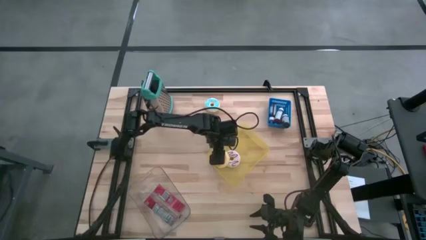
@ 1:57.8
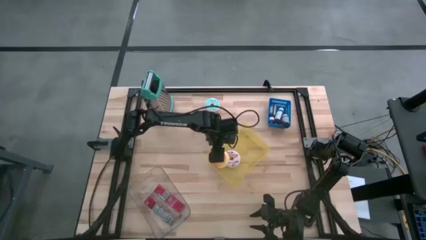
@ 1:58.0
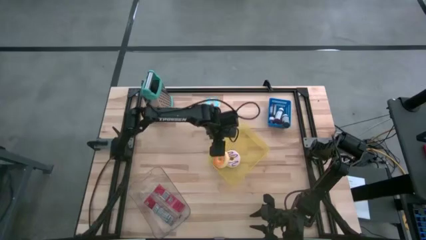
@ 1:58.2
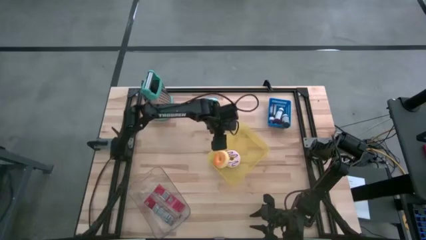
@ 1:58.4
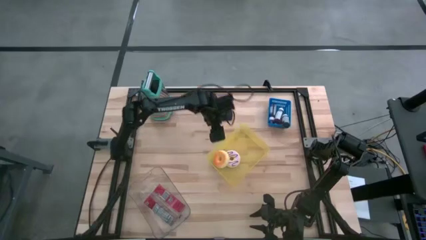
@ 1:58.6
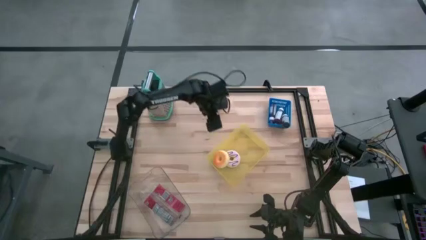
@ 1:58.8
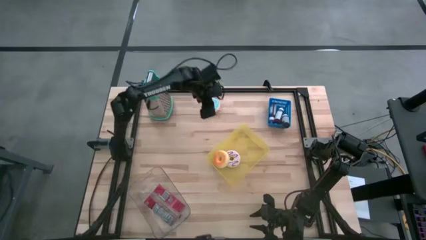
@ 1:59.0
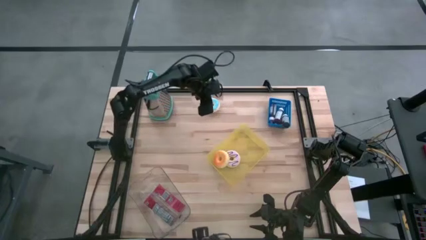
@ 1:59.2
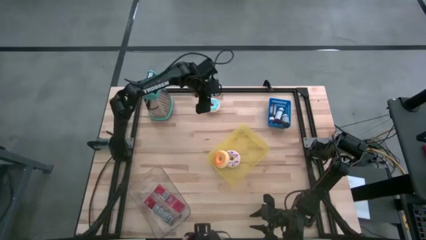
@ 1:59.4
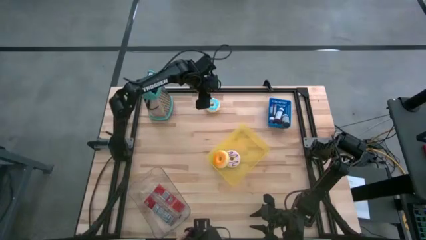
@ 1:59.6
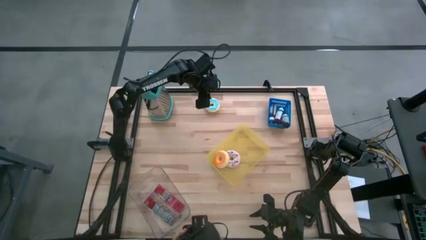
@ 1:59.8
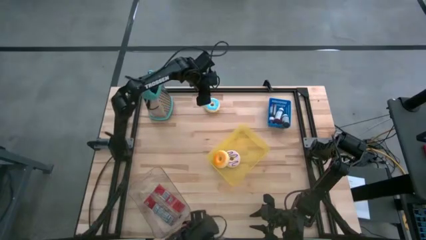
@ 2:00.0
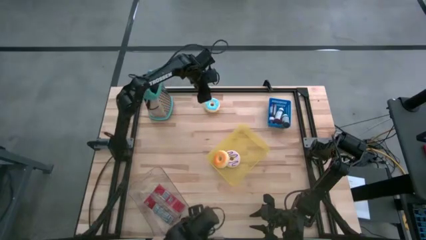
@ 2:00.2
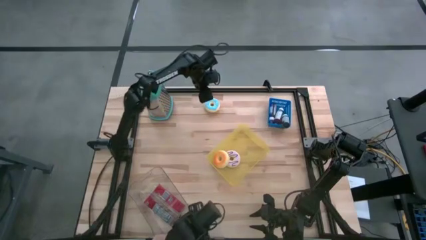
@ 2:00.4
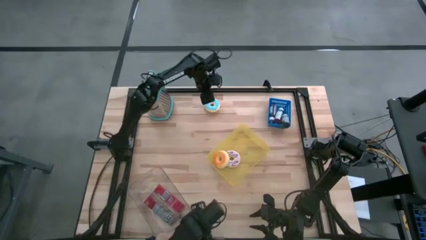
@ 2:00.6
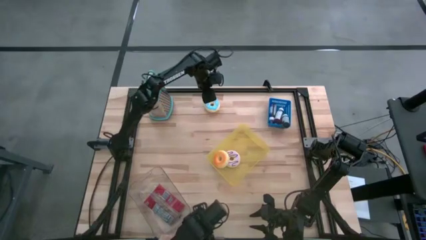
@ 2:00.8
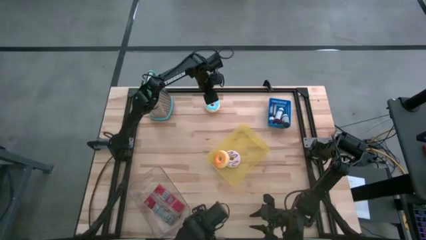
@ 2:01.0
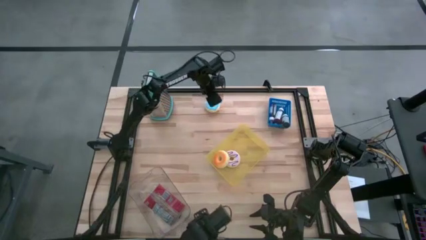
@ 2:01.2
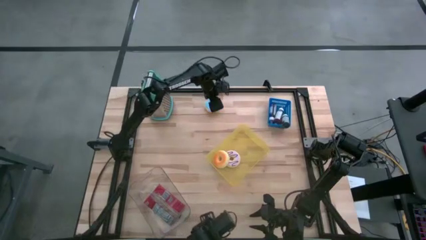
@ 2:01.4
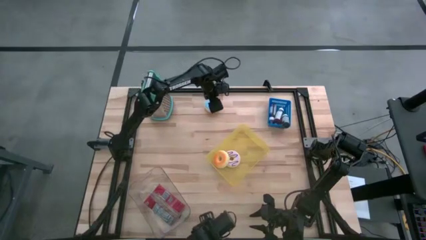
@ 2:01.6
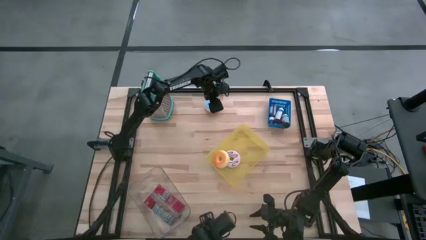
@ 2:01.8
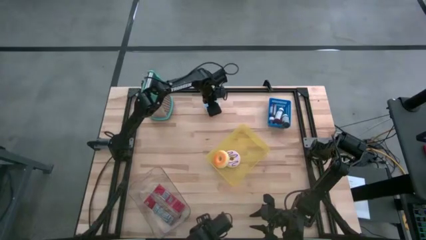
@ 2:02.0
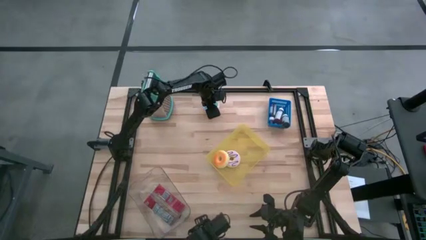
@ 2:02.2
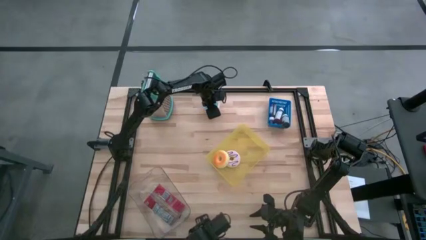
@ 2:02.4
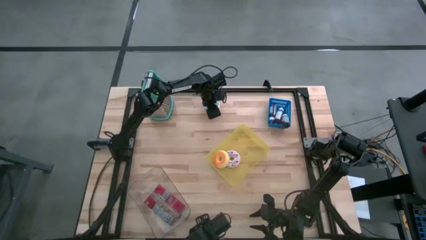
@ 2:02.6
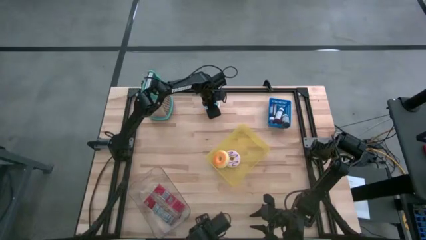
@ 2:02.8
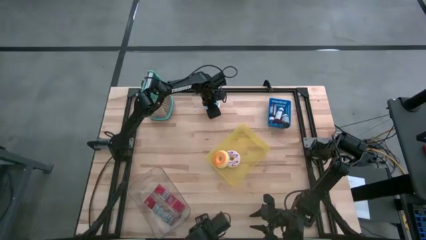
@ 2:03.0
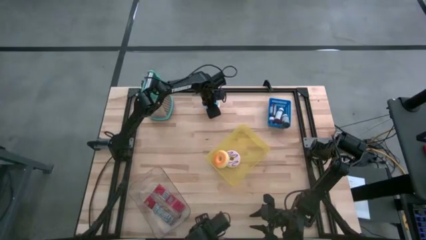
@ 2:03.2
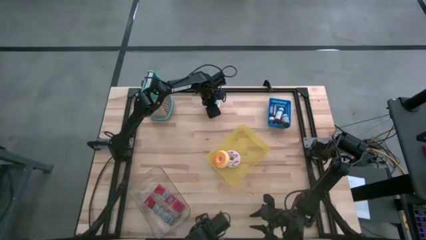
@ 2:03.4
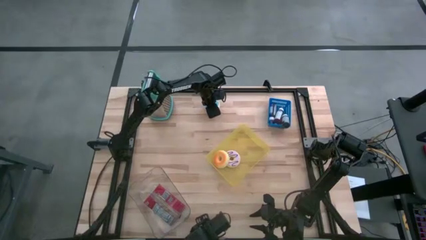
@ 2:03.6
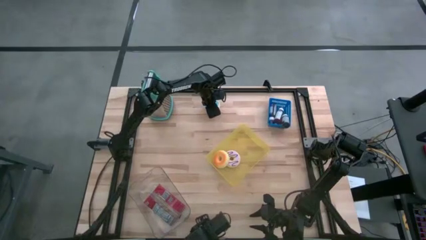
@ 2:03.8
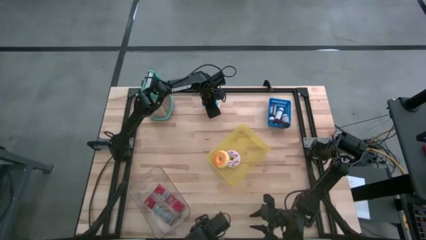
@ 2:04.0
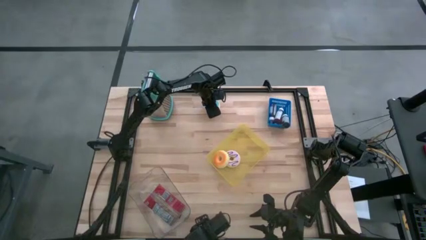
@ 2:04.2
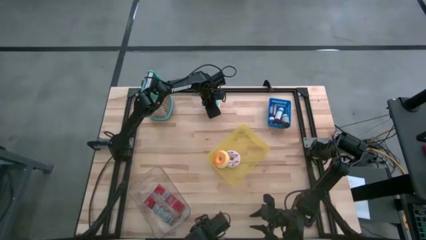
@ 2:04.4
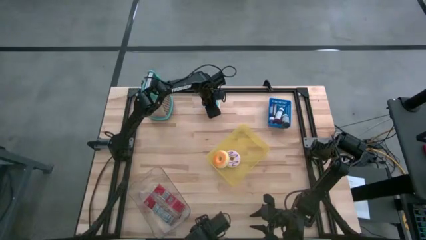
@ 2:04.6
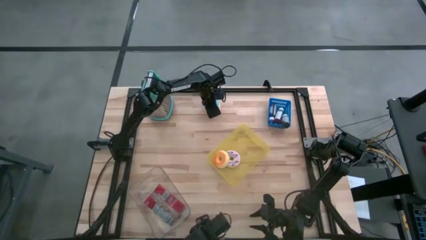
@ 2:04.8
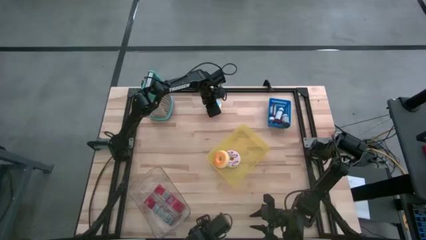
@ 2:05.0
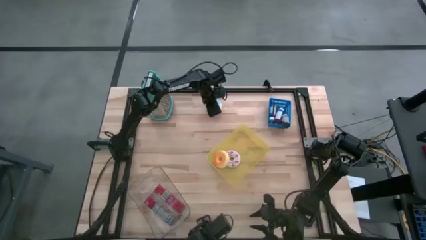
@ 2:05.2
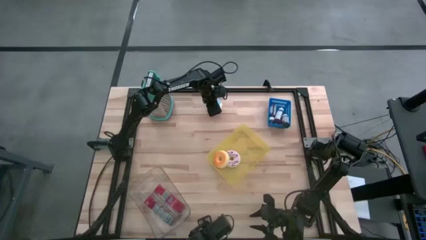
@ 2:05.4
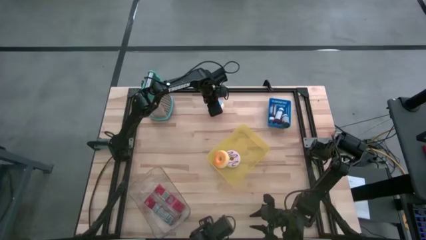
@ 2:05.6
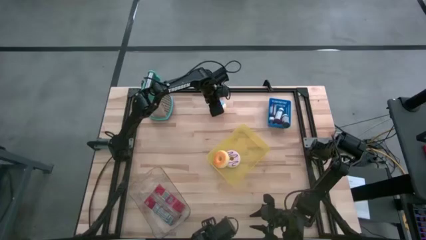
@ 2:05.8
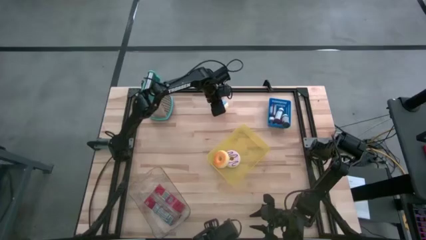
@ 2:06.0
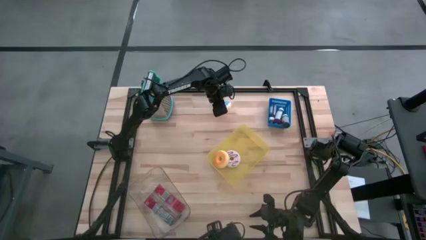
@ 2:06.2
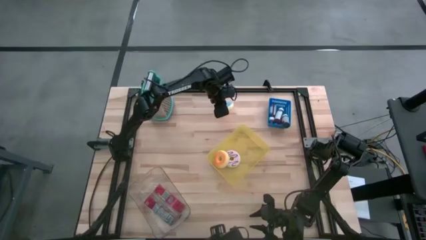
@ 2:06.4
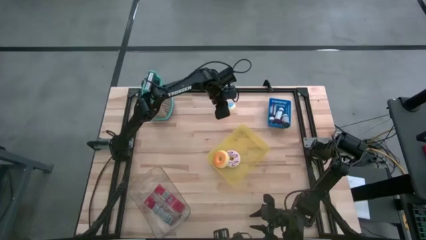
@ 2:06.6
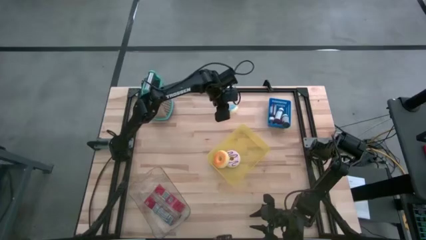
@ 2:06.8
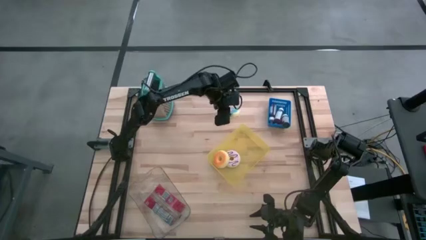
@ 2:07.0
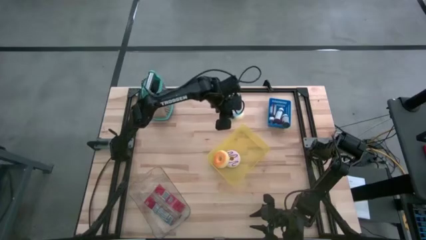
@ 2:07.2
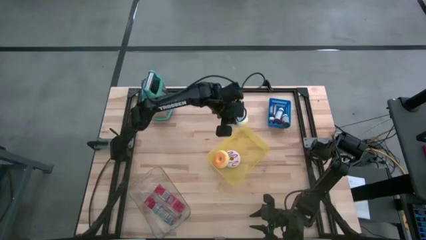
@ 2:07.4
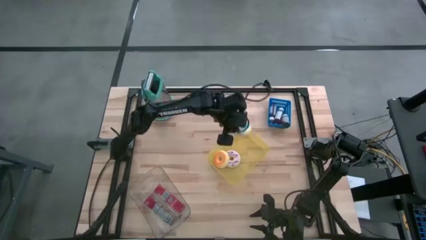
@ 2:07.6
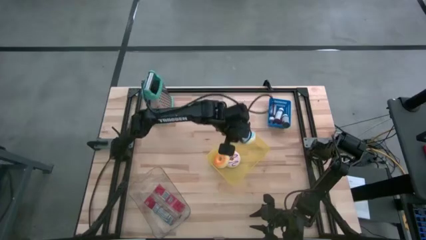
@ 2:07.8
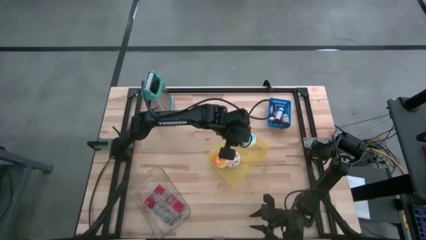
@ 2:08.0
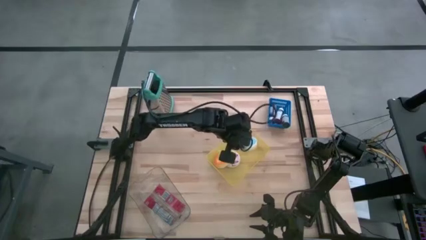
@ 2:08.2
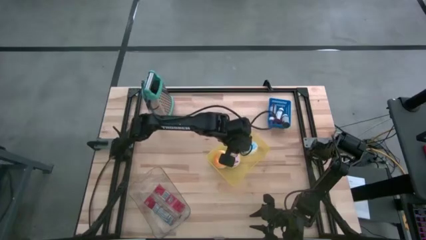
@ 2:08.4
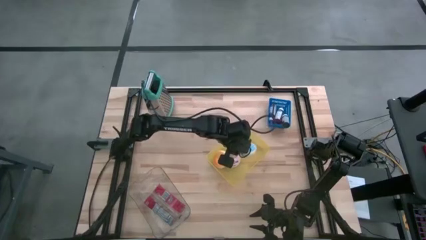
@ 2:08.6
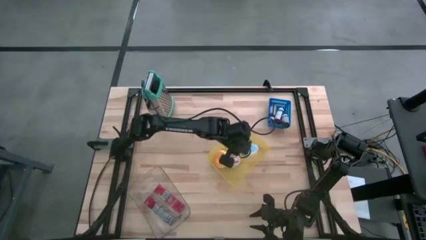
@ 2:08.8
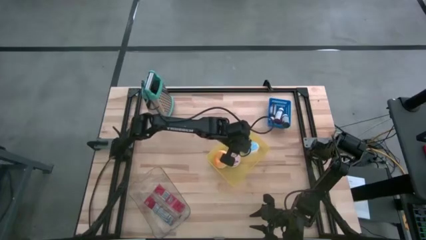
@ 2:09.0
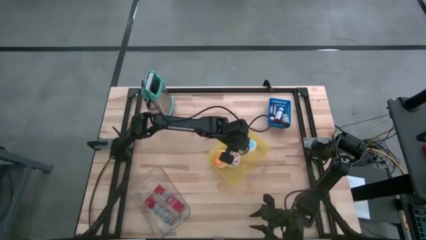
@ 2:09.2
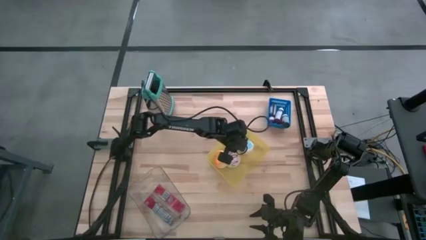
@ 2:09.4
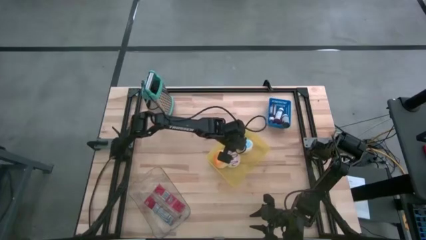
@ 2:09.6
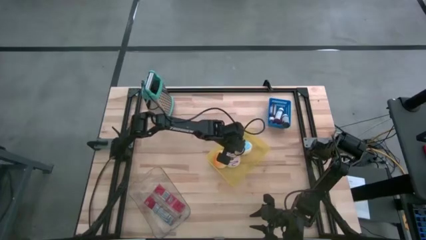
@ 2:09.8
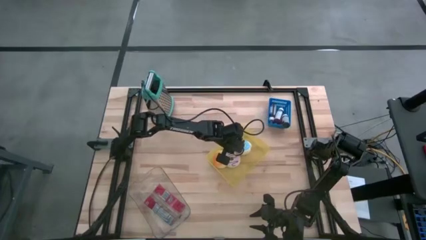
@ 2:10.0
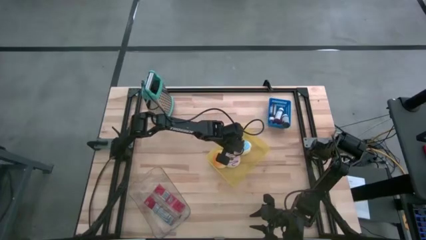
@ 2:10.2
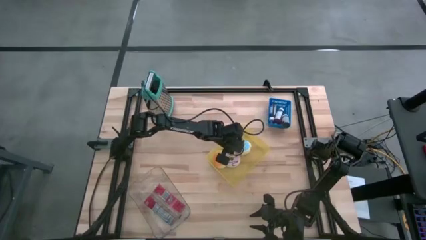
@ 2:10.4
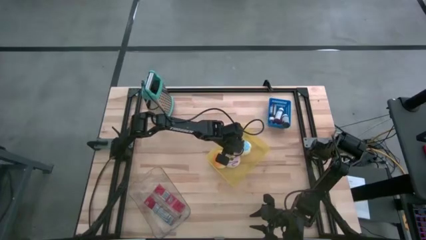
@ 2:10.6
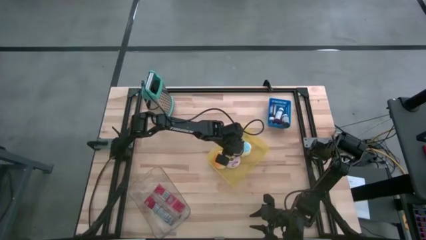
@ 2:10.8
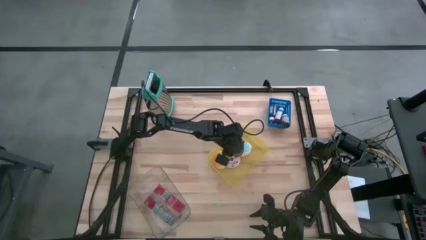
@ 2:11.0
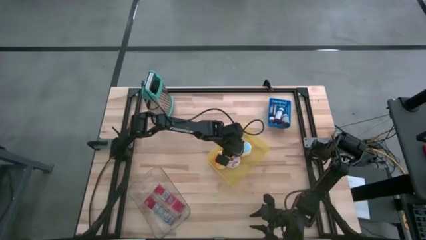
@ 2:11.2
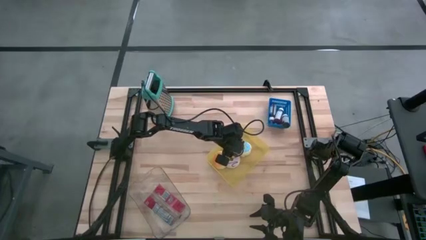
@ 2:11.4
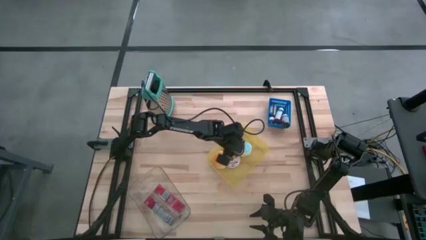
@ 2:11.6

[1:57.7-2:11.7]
Task: Pick & Place Food Item
Put the blue donut into the yellow bin
